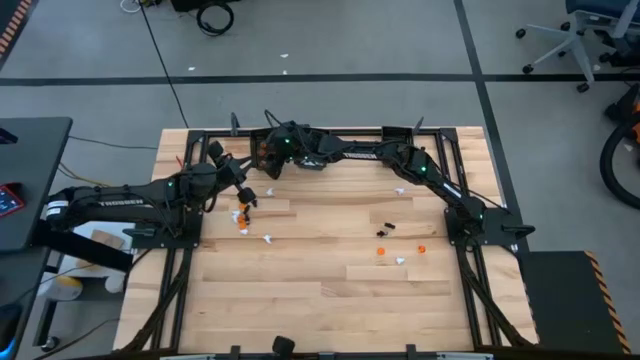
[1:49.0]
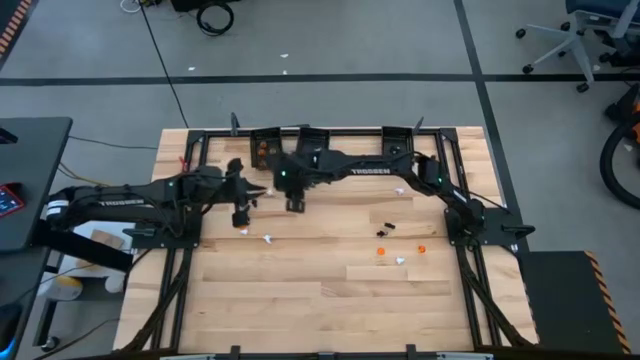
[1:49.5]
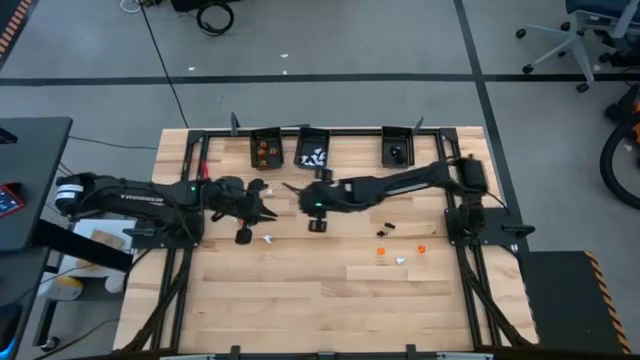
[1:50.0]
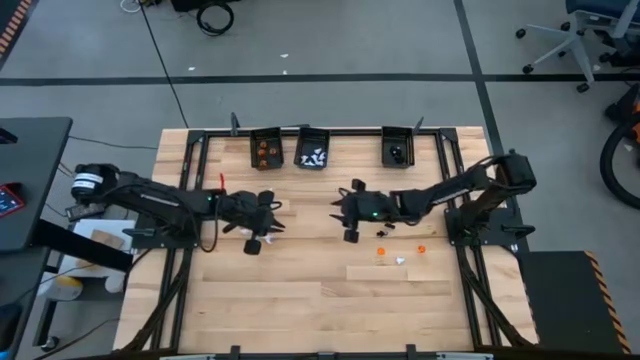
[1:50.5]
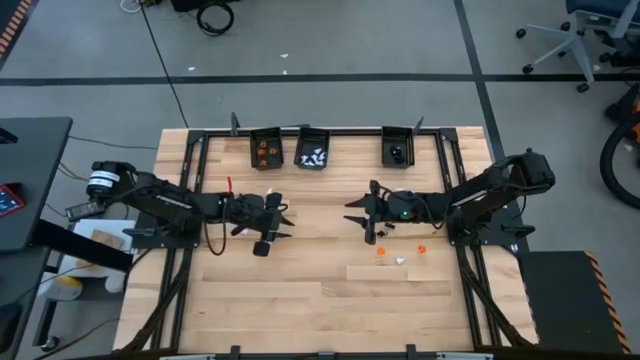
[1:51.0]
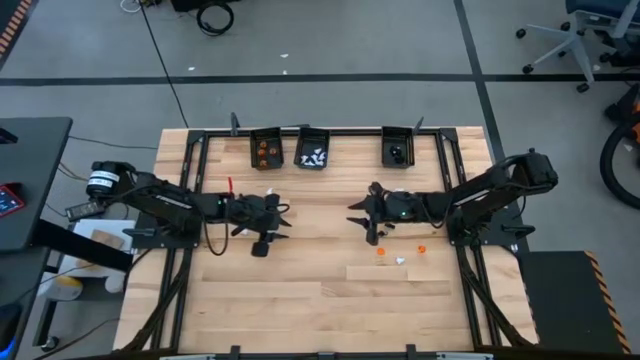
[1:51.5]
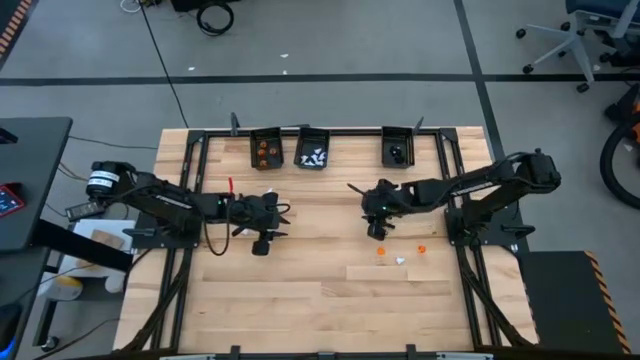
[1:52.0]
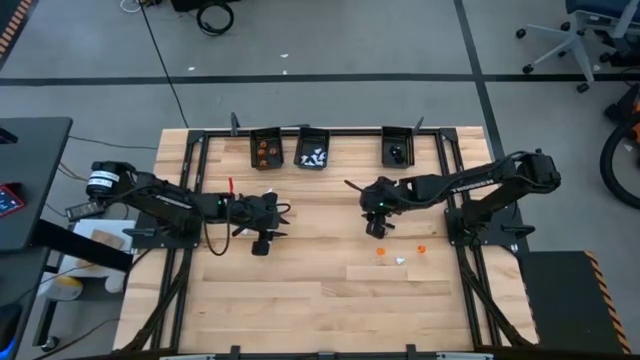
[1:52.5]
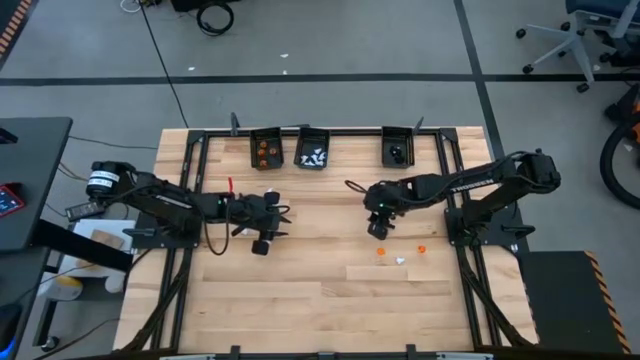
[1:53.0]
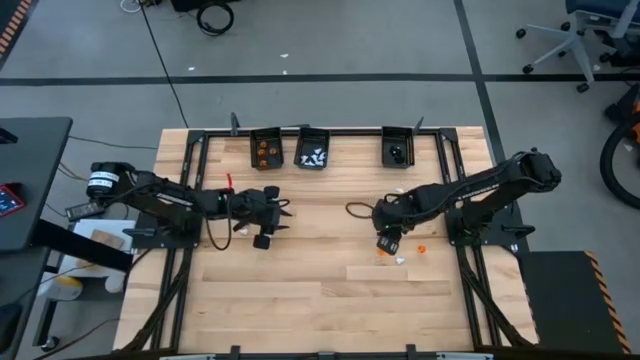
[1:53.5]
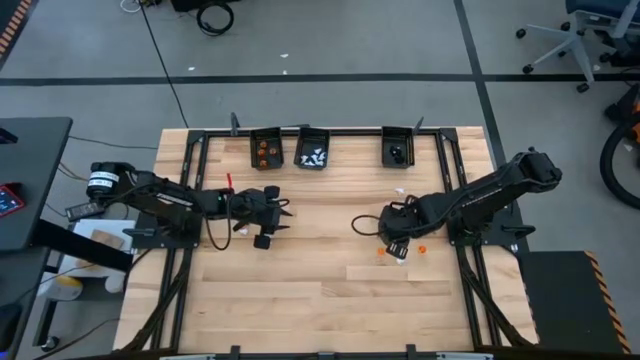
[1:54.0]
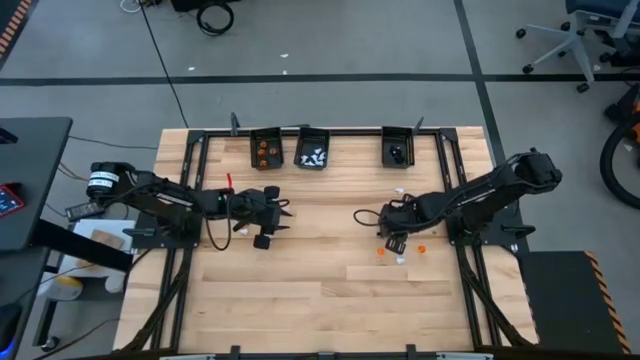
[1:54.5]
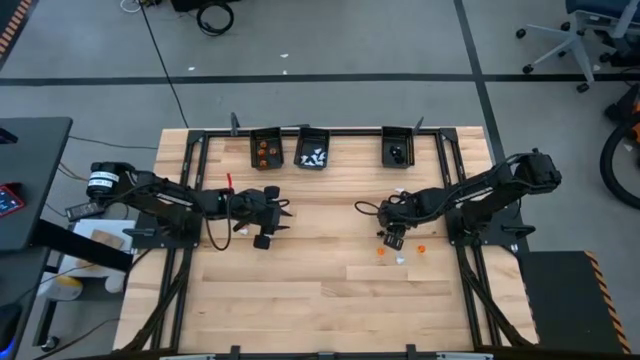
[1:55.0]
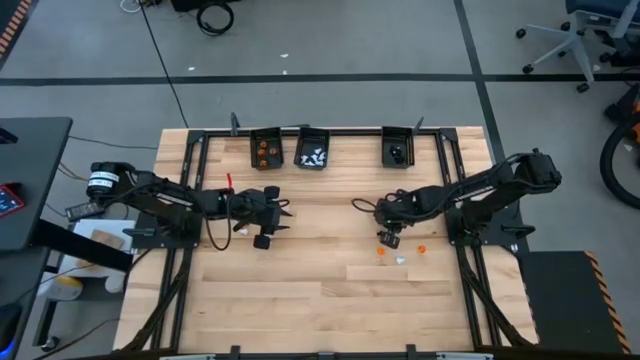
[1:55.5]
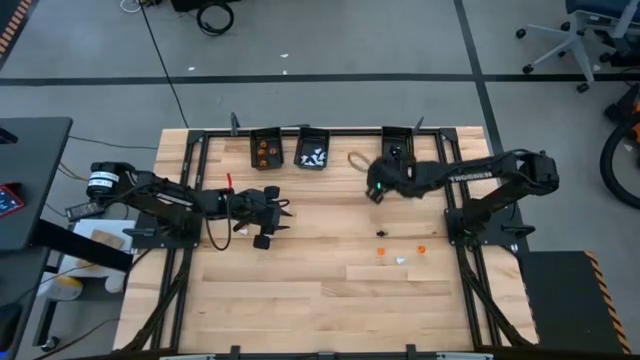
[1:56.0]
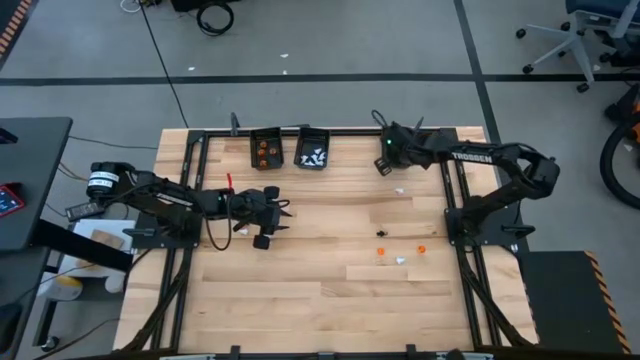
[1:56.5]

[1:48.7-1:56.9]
Task: Sort Halloween decoration
Put the black voodoo toy into the right black bin

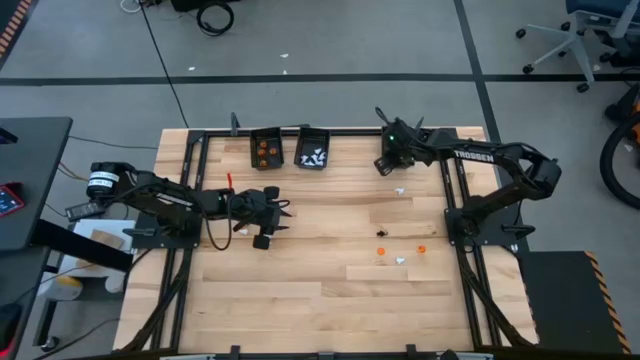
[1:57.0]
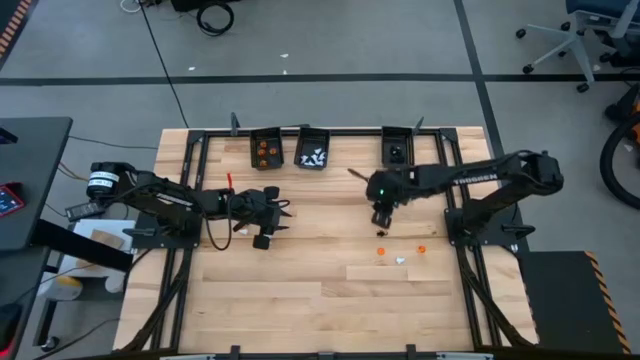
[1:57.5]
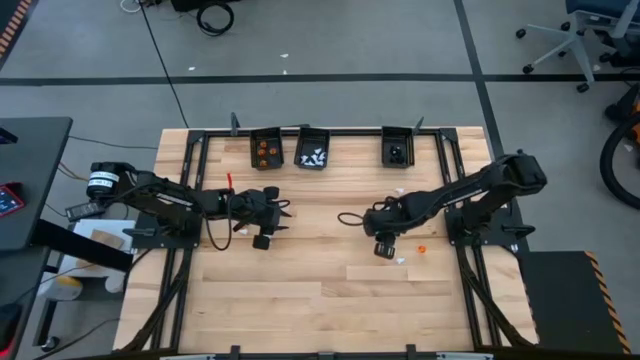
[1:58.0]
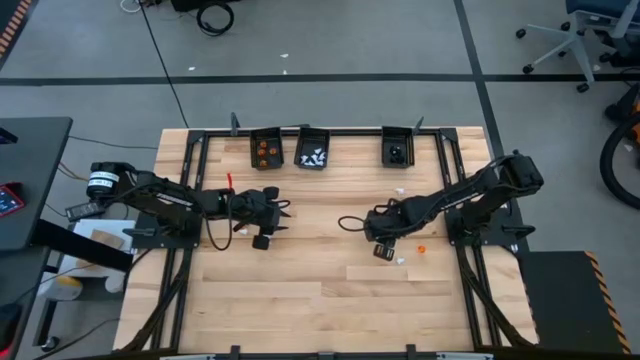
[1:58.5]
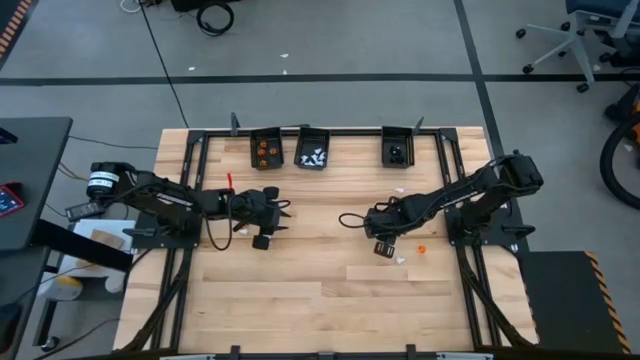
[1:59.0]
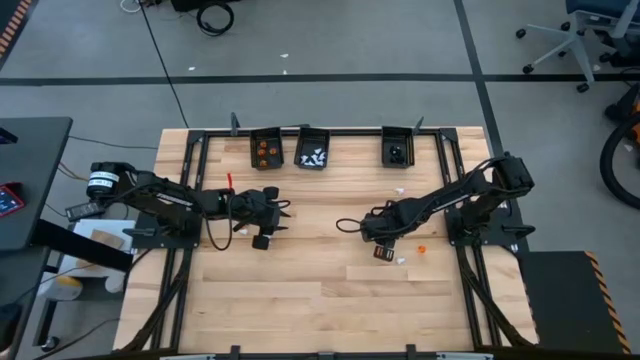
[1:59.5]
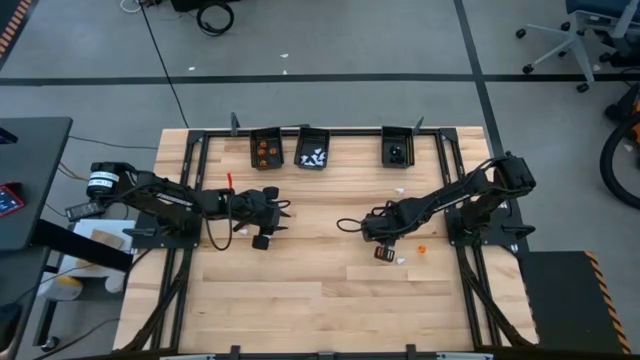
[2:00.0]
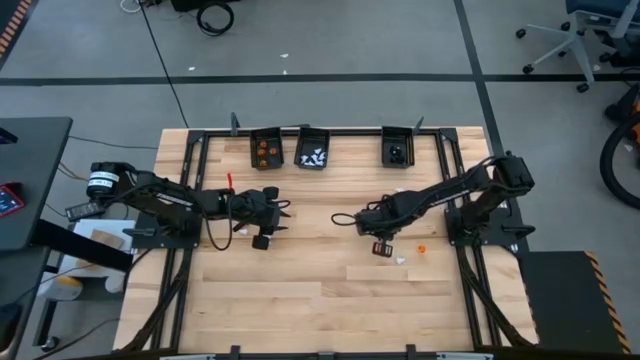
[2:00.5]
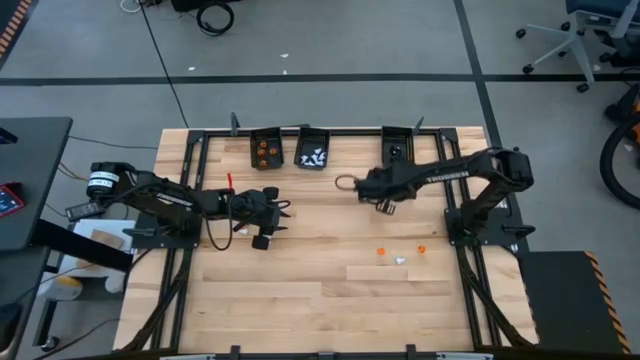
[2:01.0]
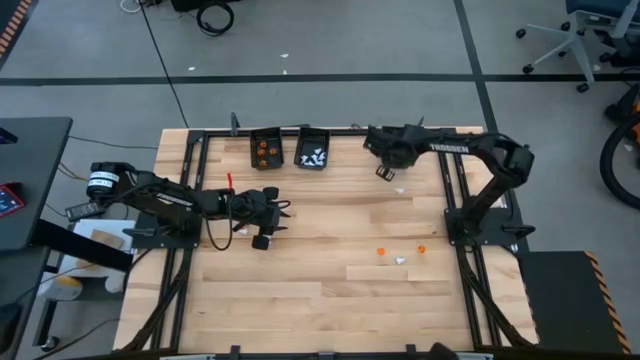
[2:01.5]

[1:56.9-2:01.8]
Put the black voodoo toy into the right black bin

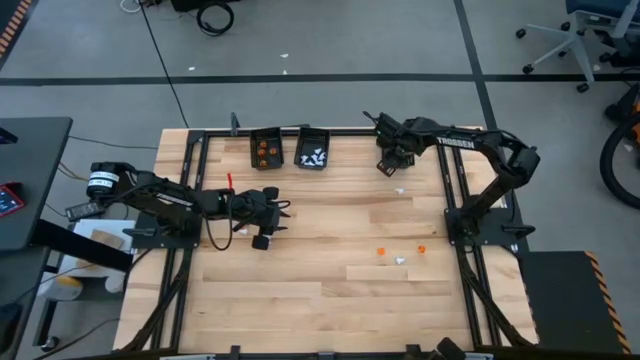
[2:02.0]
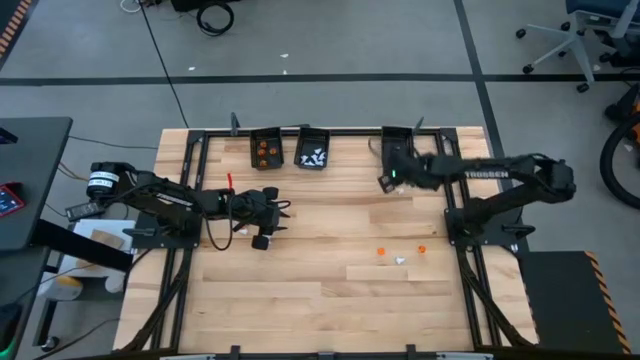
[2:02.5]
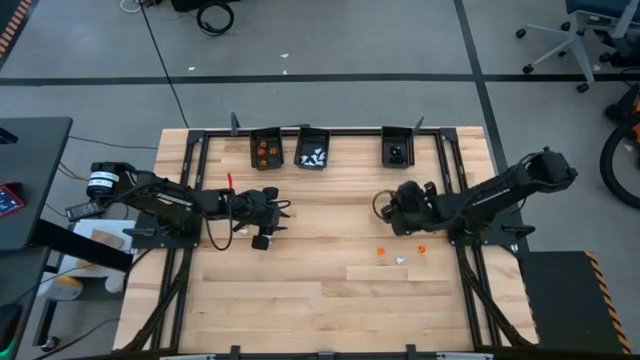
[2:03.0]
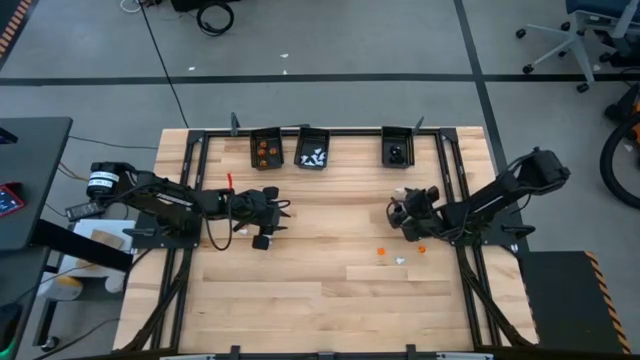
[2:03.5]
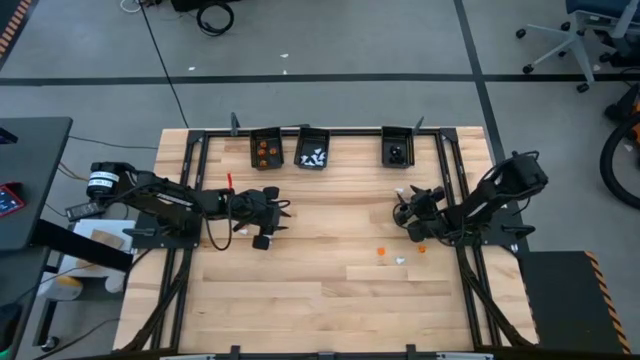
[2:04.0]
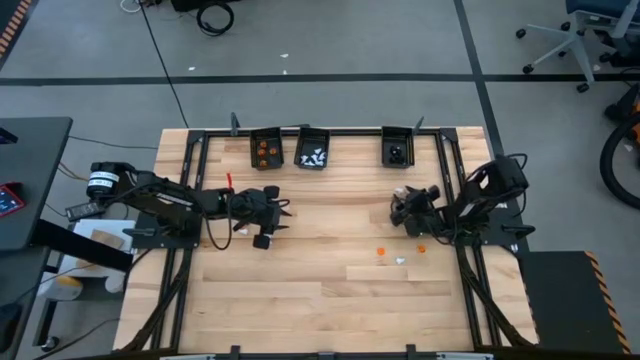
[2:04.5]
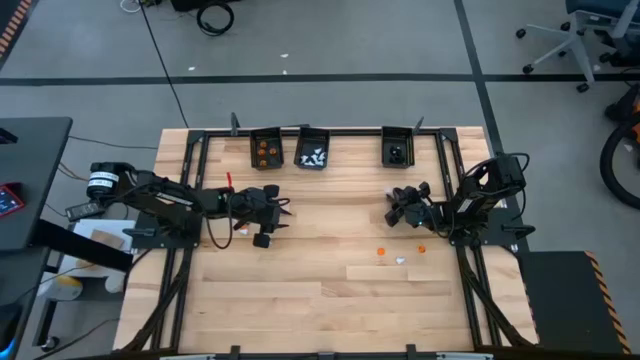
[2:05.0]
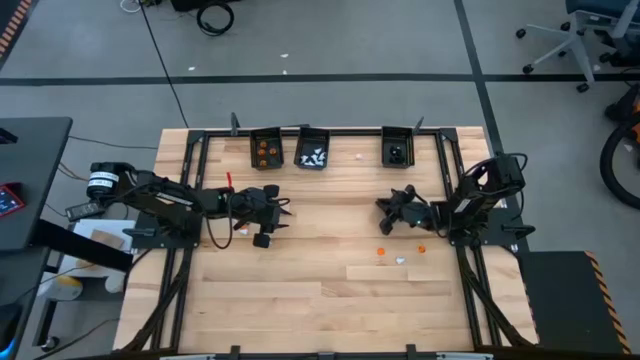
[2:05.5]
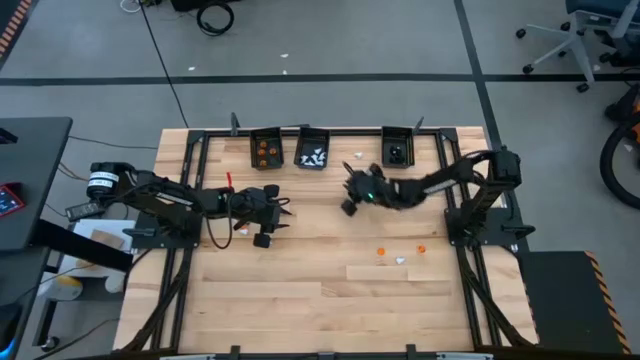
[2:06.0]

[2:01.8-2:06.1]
Put the white ghost toy into the middle black bin

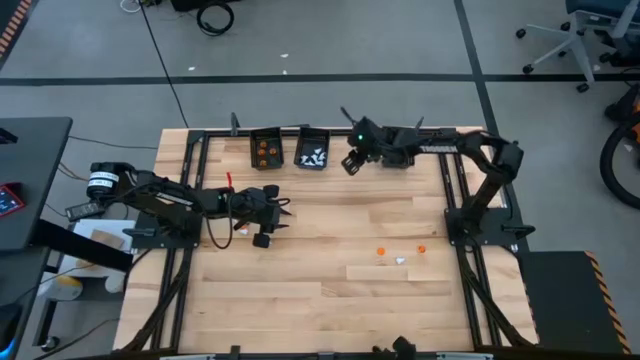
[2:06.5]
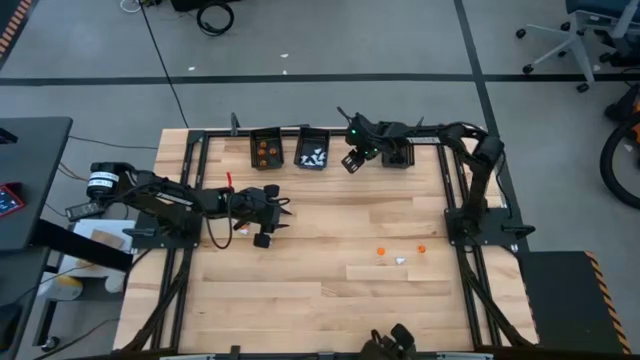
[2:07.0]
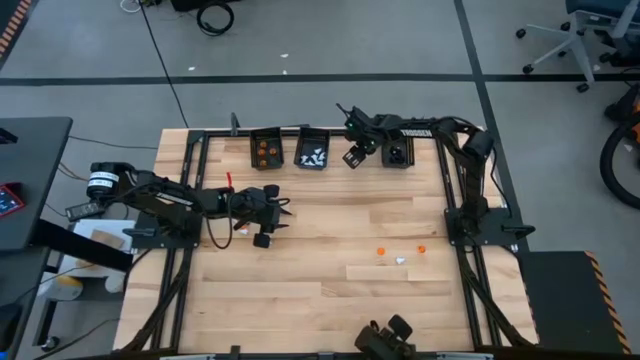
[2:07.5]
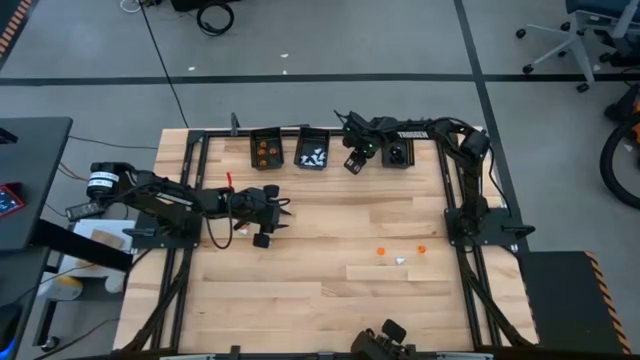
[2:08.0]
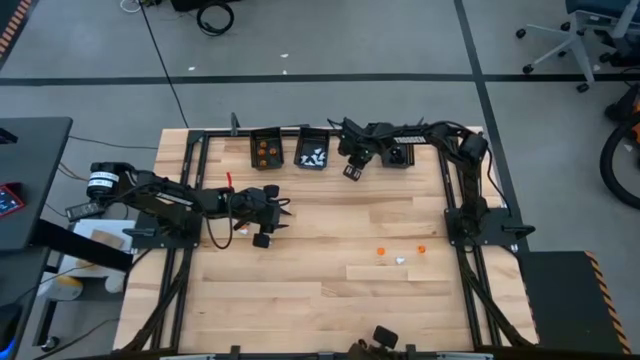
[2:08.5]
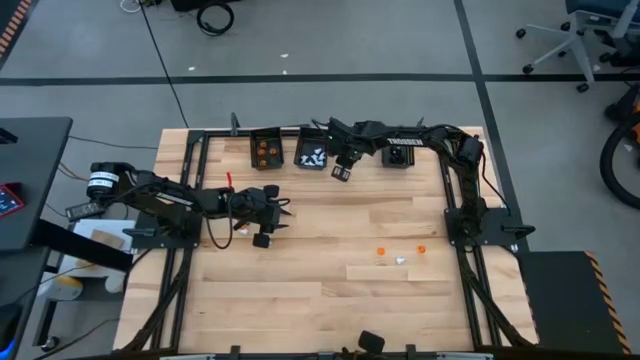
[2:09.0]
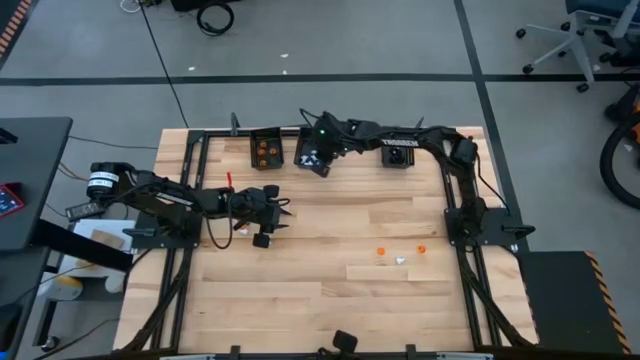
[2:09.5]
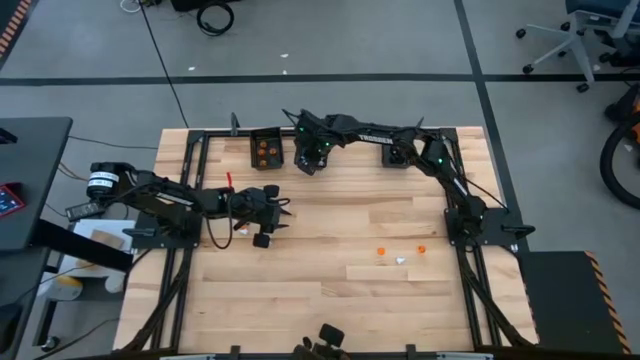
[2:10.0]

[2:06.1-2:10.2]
Put the white ghost toy into the middle black bin
